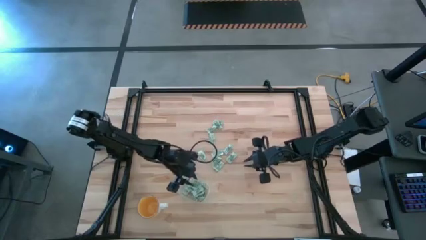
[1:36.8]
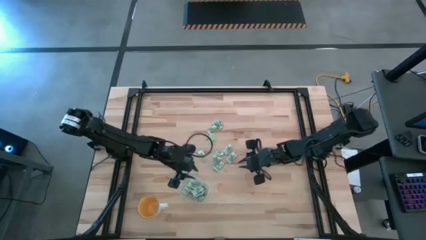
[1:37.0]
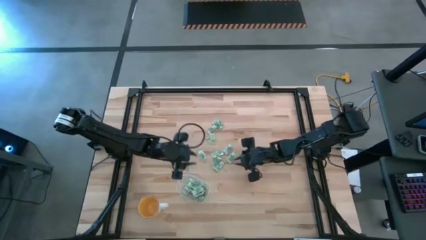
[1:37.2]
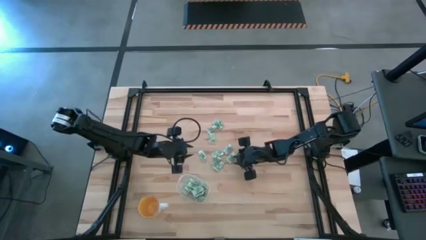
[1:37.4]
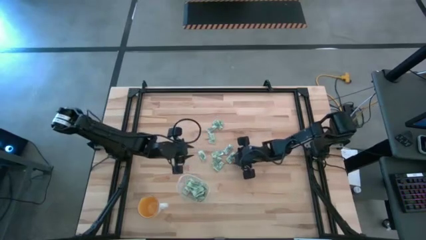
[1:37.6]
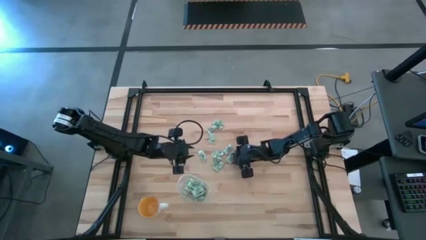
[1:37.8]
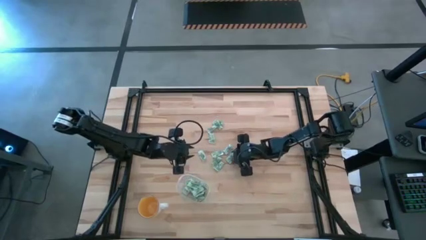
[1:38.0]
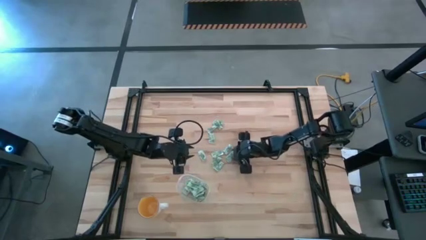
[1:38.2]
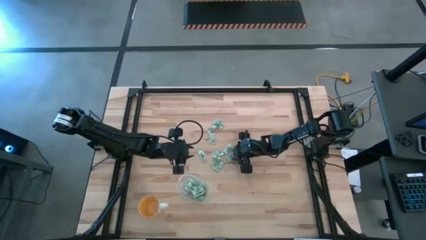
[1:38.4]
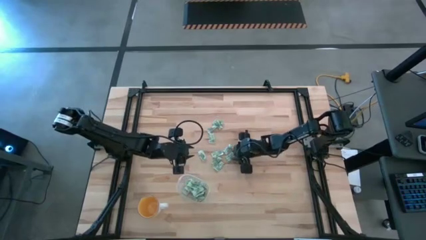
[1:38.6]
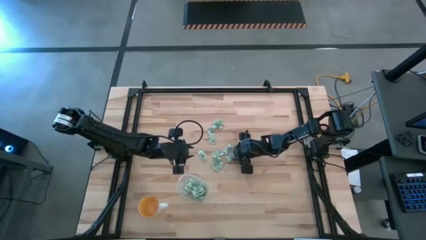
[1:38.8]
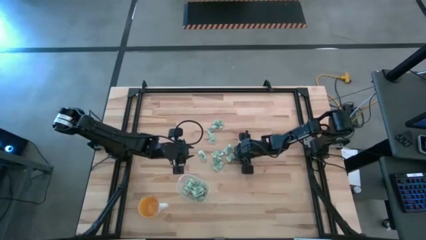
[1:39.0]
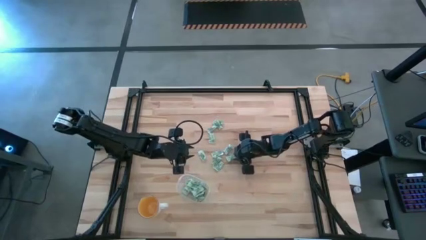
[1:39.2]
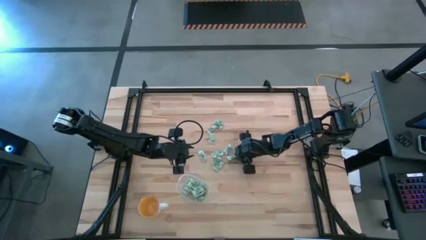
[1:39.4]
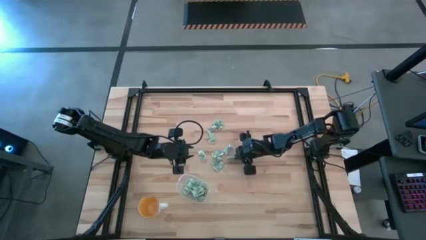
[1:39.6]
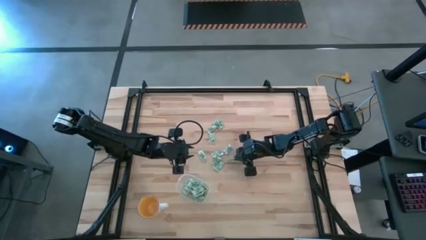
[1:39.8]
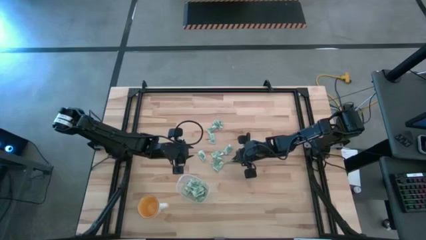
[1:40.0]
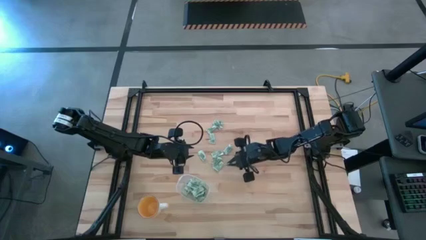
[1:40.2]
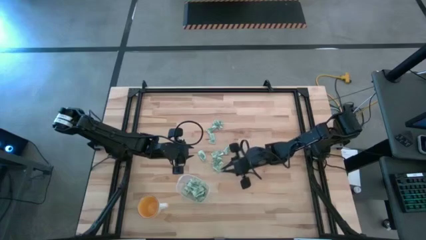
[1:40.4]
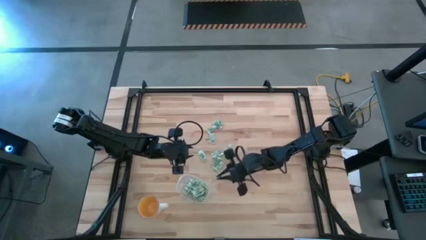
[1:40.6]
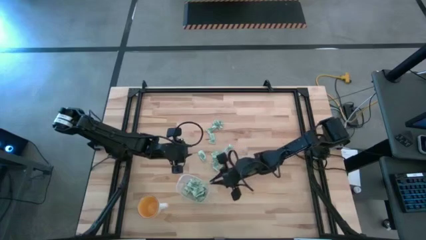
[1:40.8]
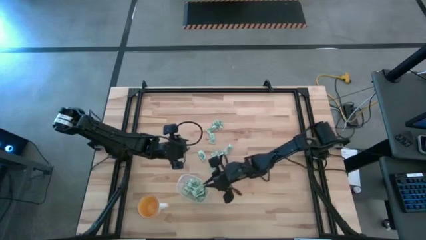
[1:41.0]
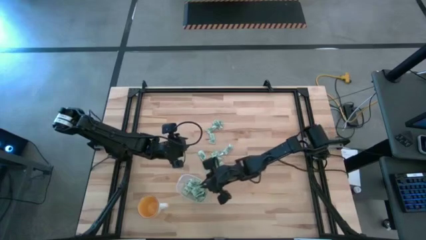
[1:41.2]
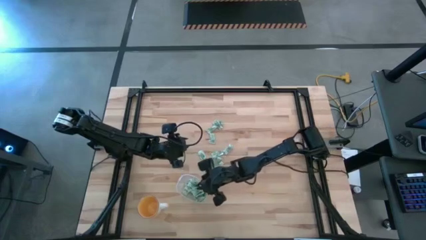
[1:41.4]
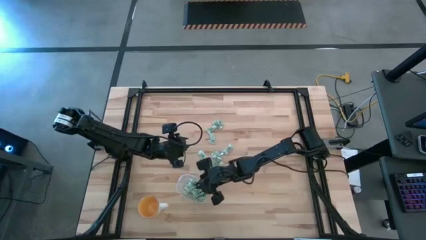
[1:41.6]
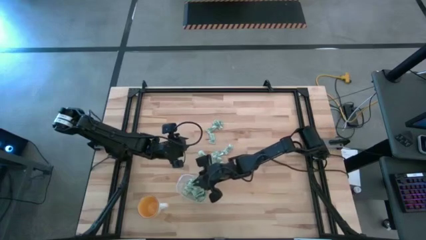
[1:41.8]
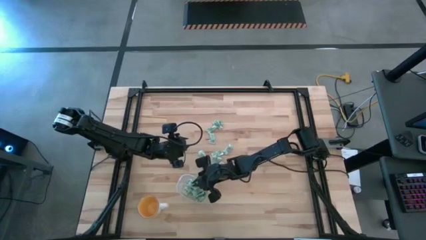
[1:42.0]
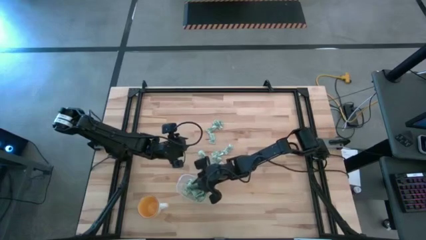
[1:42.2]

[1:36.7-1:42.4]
Task: Pick and place Stevia / Truvia into bins
Put the stevia packet into the transparent container

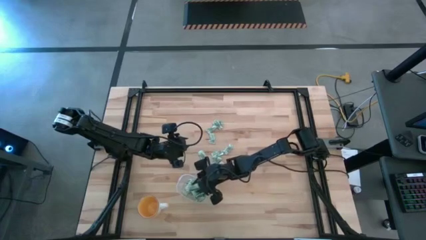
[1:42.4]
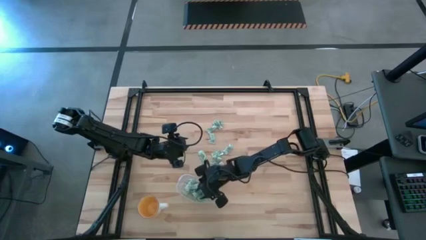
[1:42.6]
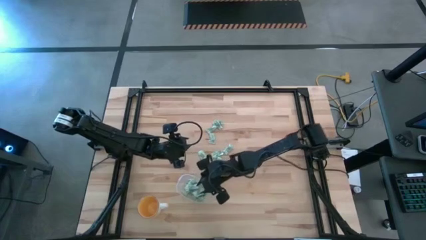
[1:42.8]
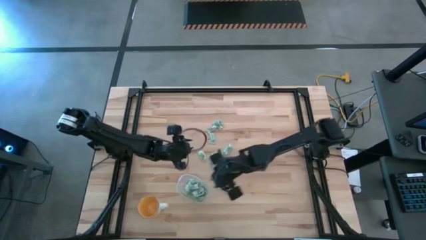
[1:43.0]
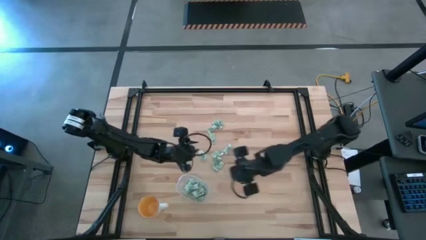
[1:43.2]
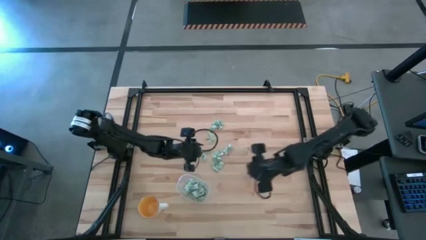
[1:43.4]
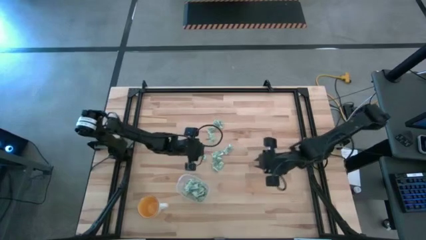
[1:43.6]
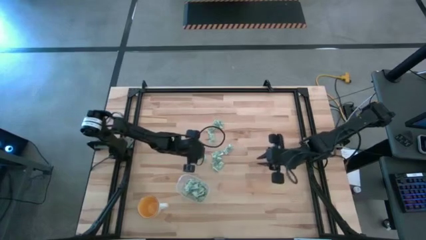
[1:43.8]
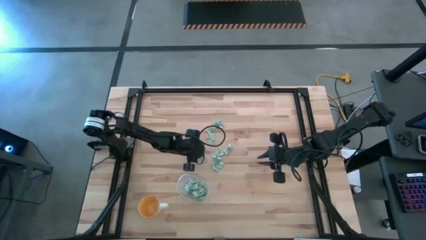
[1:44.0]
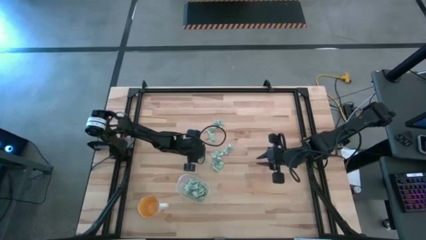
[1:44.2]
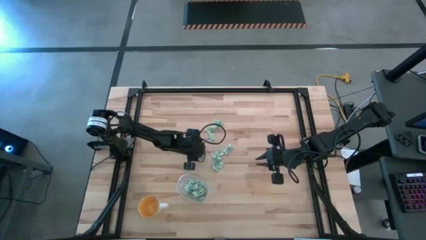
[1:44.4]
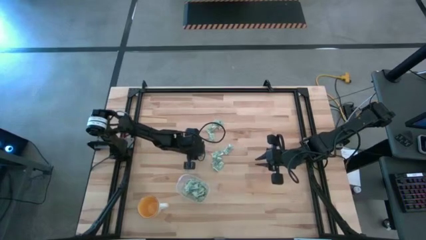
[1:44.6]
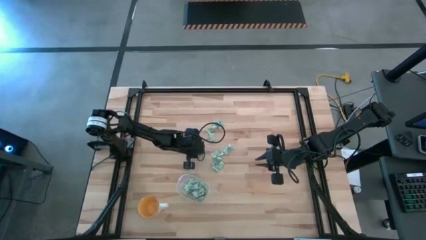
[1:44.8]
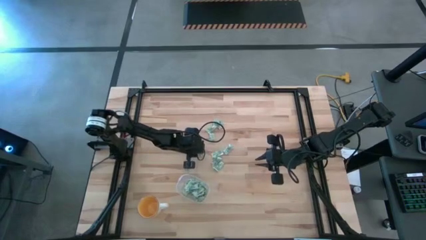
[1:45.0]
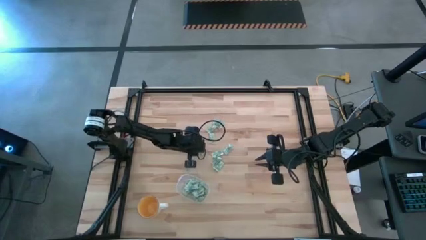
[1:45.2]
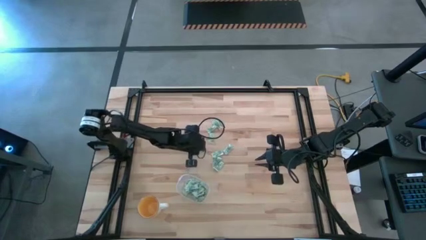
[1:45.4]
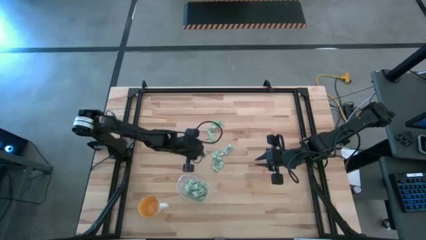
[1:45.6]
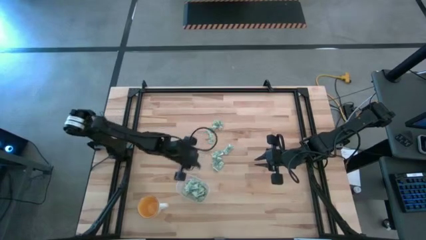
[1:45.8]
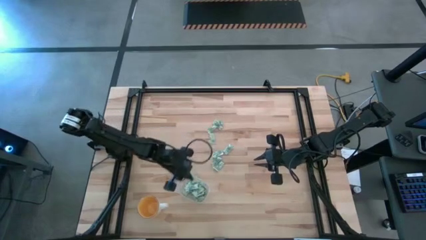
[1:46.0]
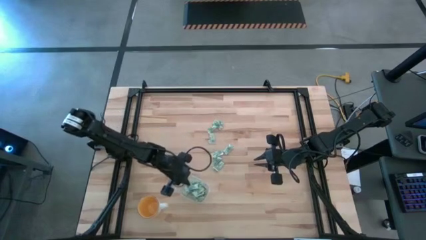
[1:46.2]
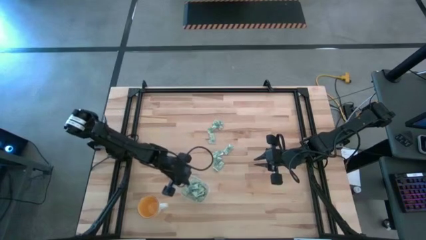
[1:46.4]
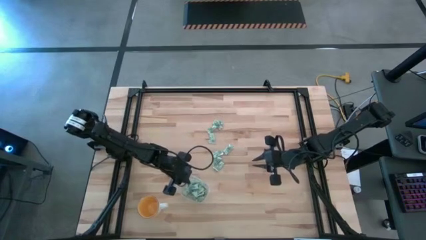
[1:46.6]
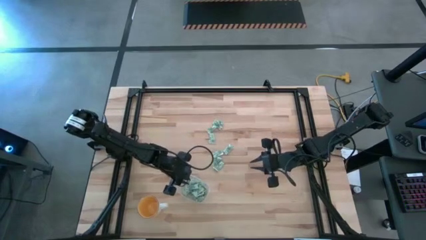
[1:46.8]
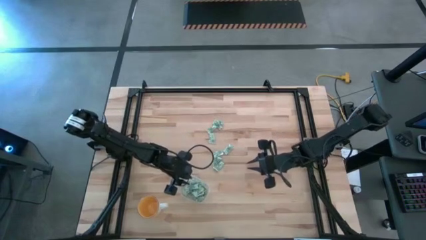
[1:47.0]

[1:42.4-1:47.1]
Put the stevia packet into the transparent container

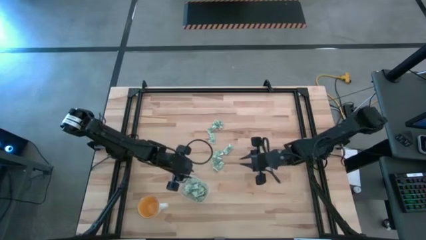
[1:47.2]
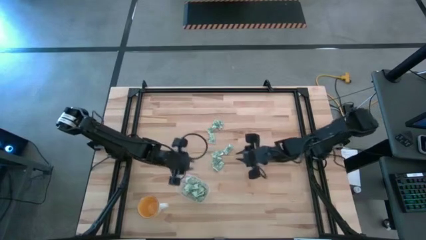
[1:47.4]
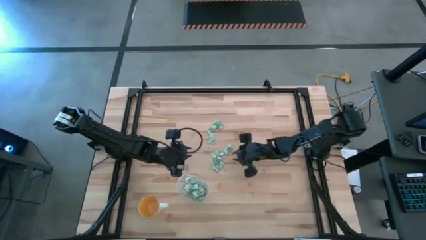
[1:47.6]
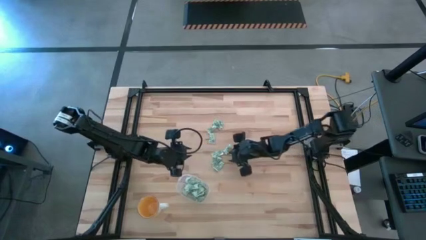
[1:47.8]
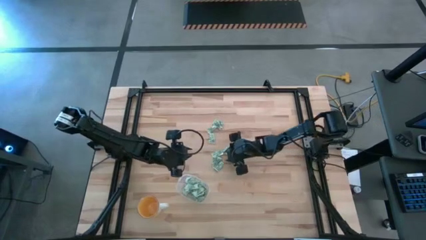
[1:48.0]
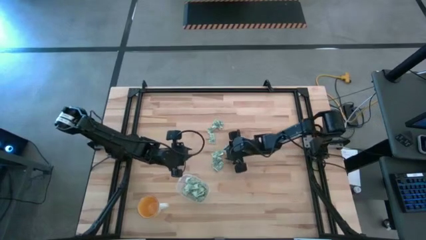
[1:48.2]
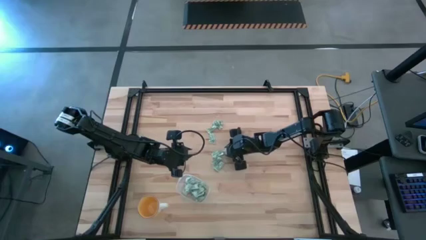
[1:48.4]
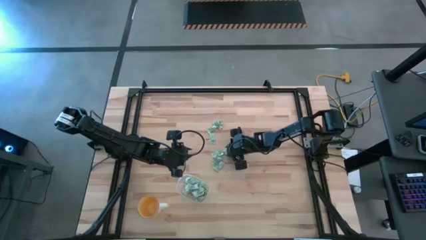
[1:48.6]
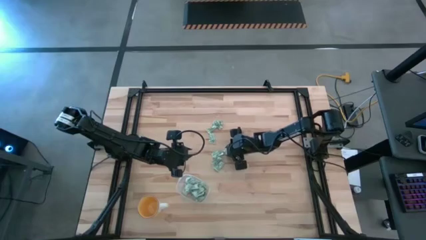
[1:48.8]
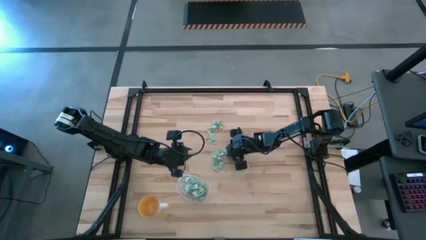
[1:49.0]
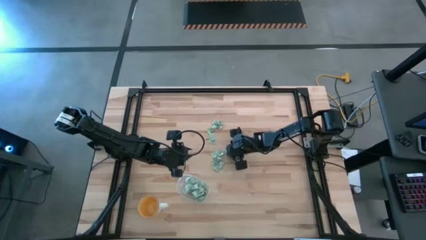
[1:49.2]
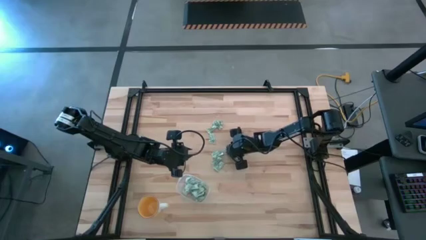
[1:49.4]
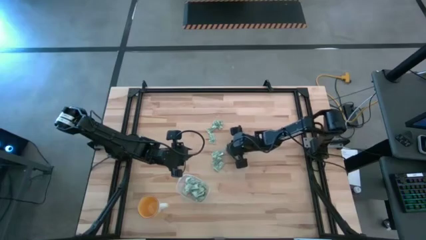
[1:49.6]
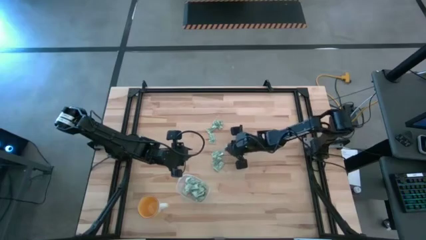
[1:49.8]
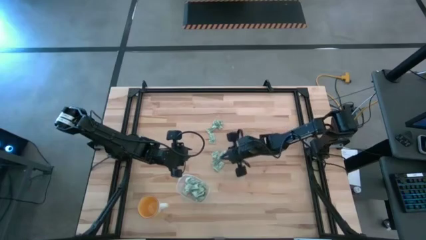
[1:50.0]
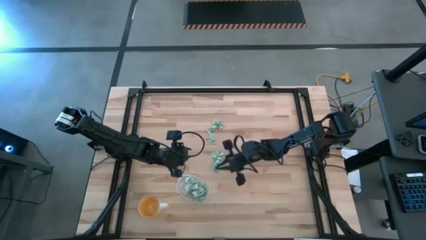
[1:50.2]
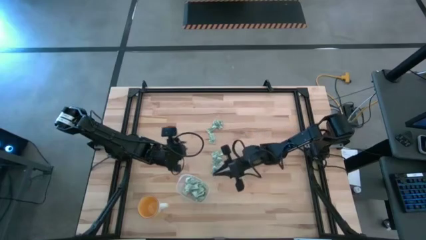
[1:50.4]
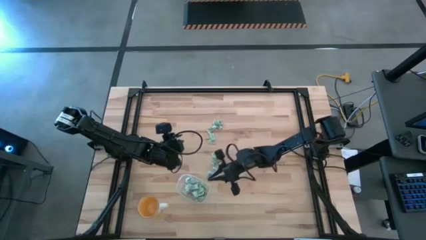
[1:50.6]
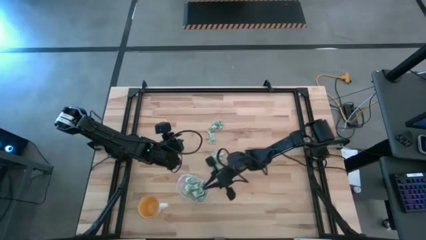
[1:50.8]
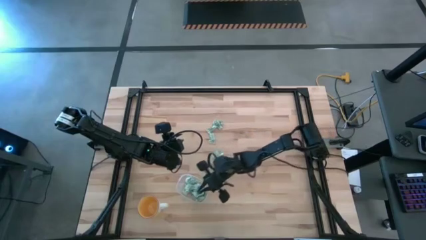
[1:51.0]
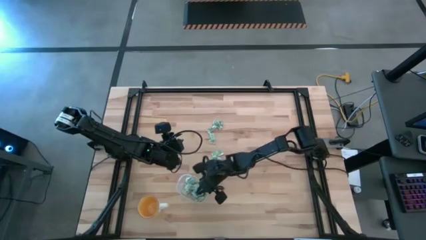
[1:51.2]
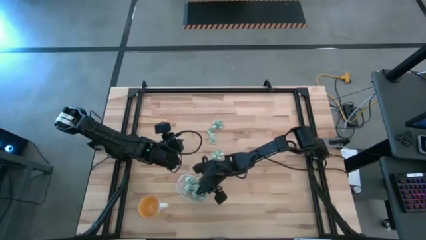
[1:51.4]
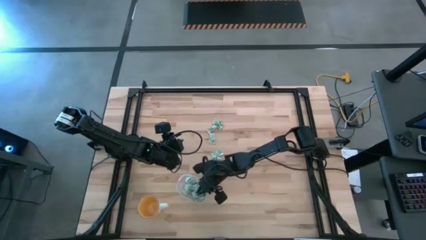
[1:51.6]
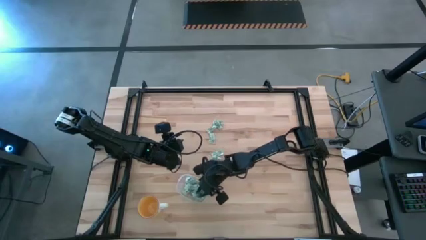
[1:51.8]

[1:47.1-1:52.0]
Put the stevia packet into the transparent container

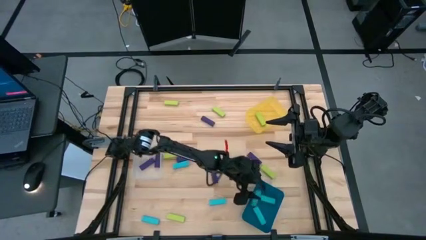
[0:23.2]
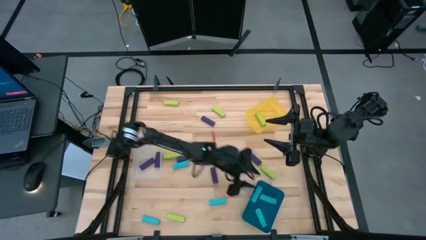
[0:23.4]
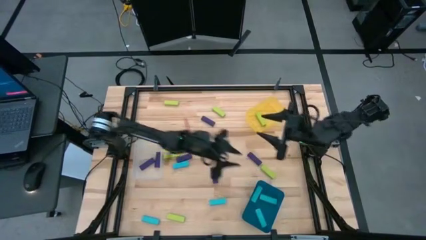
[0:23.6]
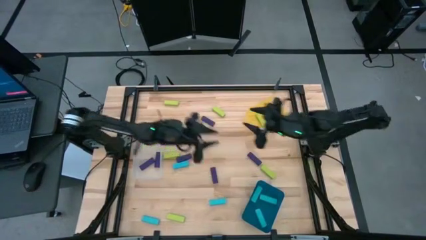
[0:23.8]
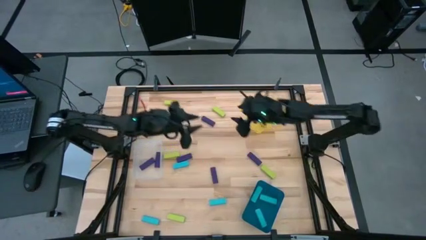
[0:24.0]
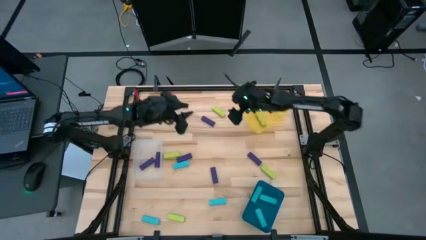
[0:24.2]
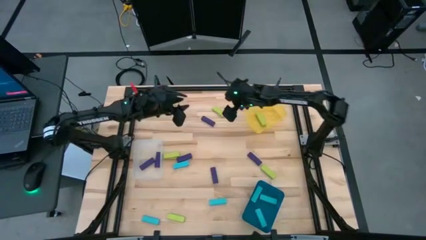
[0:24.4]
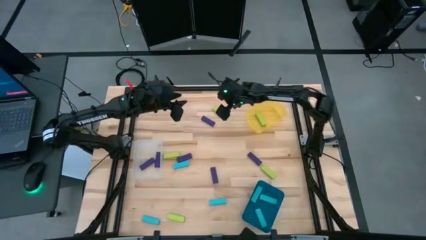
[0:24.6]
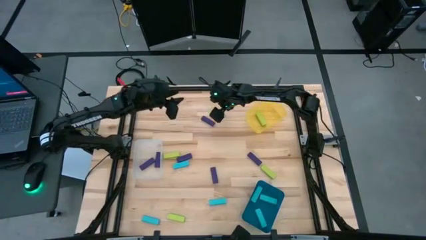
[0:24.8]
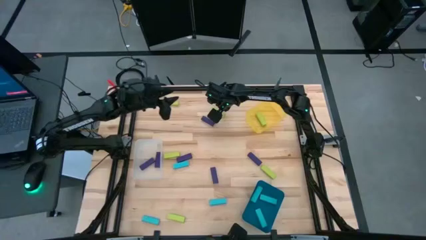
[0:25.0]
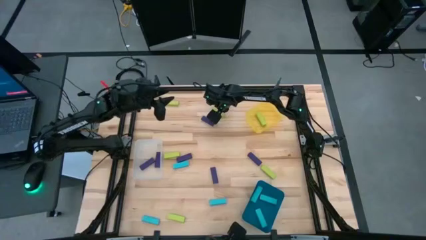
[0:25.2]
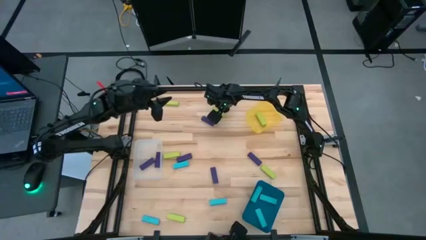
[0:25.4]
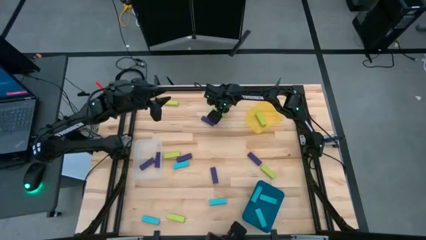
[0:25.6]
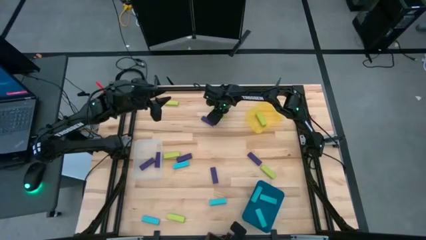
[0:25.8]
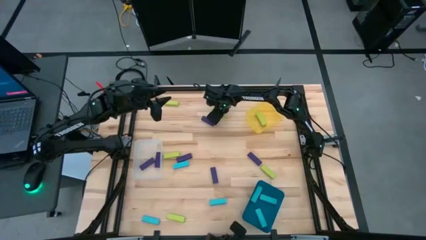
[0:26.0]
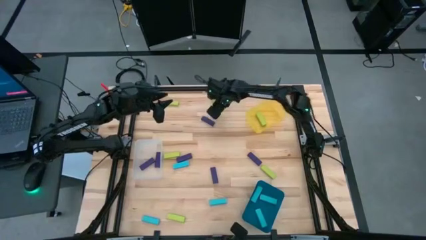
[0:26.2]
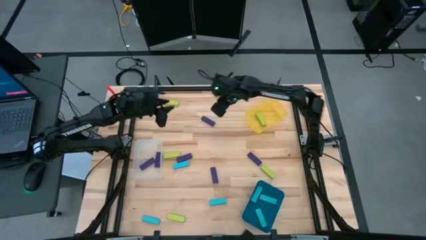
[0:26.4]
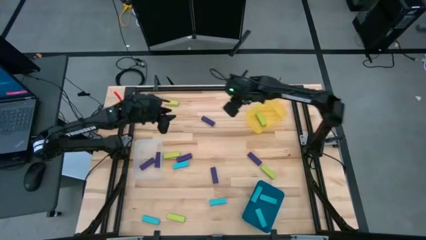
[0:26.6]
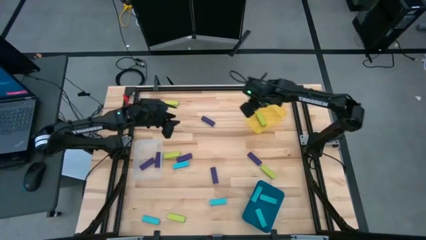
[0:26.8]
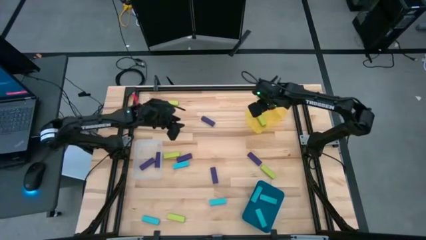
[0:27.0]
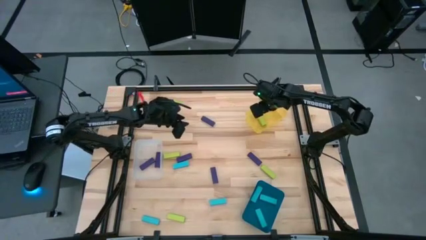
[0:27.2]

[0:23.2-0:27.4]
Task: Sort blocks
Put the green block into the yellow bin
